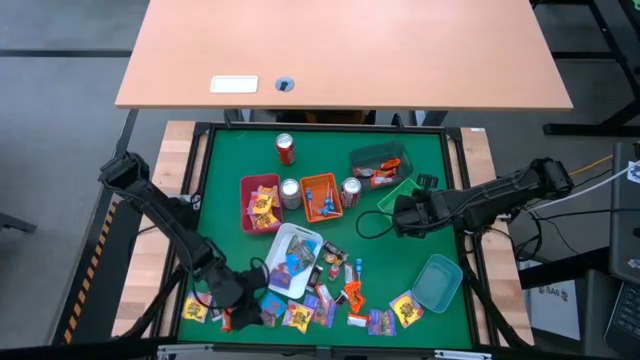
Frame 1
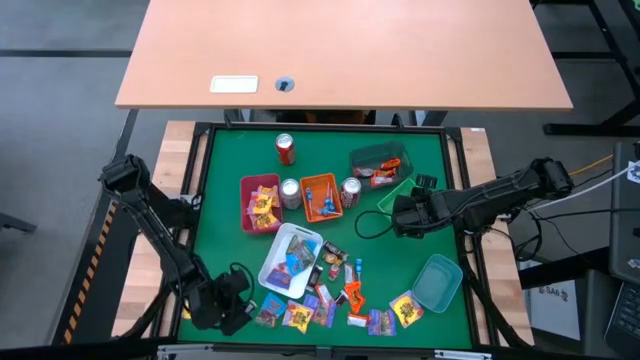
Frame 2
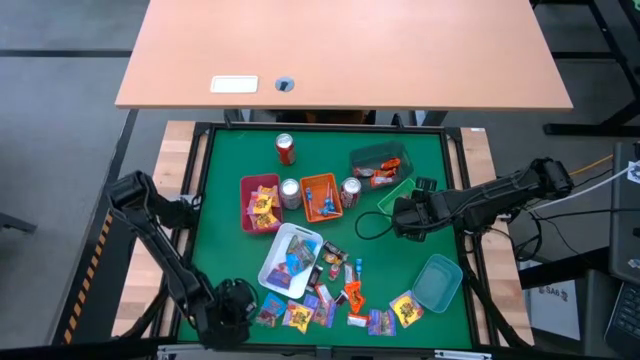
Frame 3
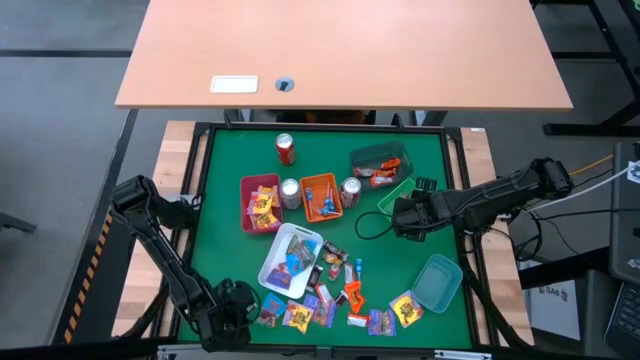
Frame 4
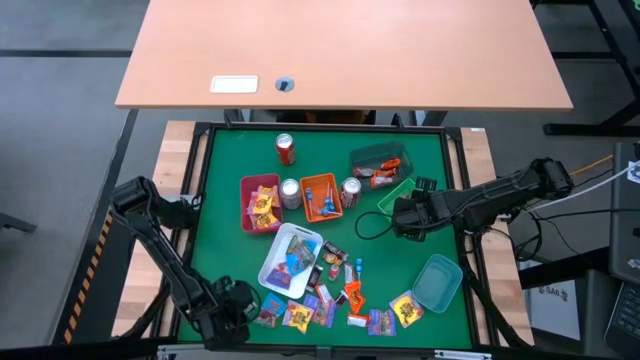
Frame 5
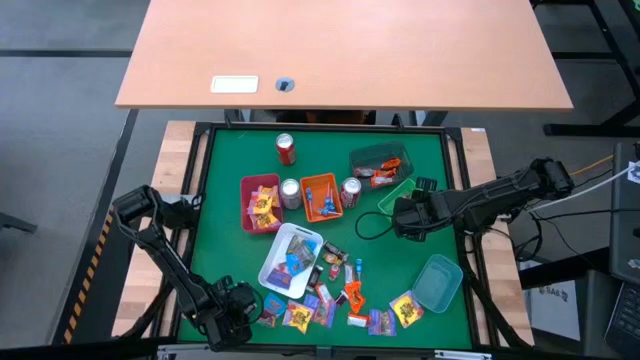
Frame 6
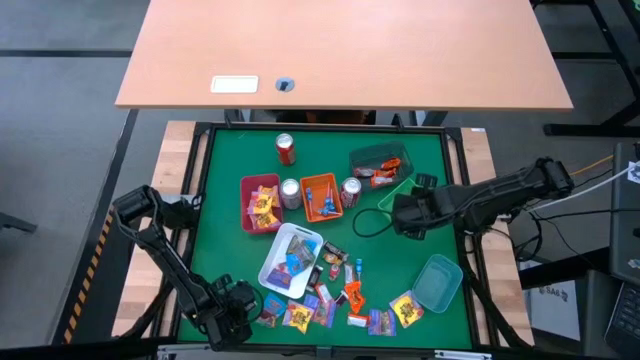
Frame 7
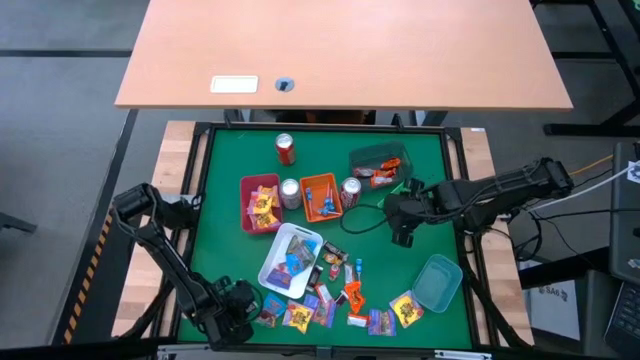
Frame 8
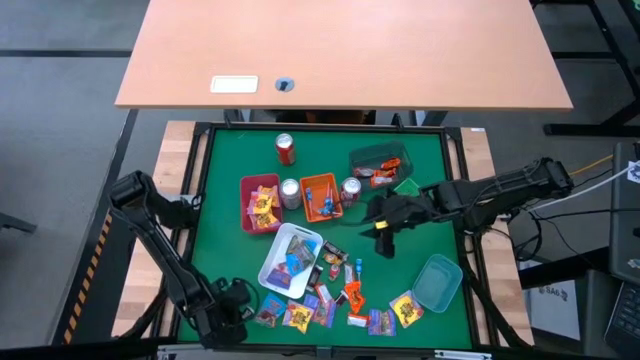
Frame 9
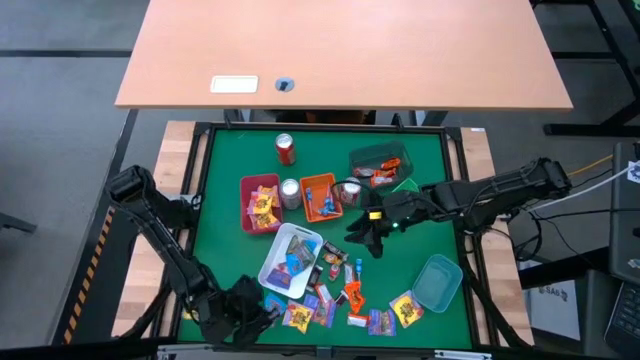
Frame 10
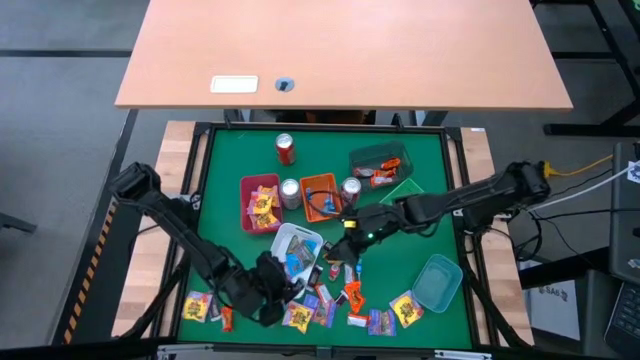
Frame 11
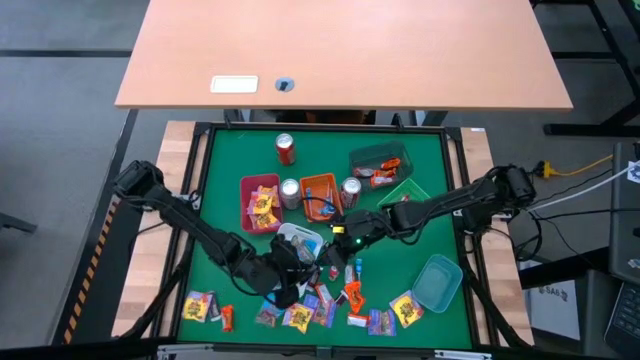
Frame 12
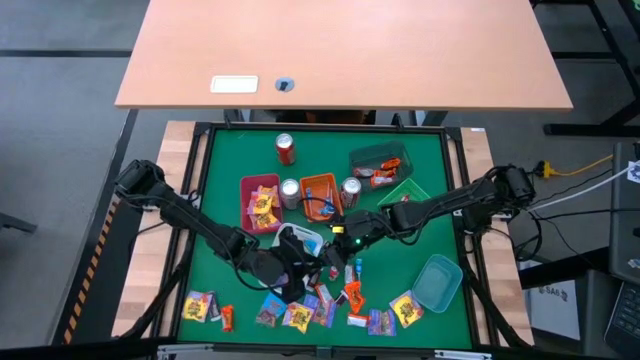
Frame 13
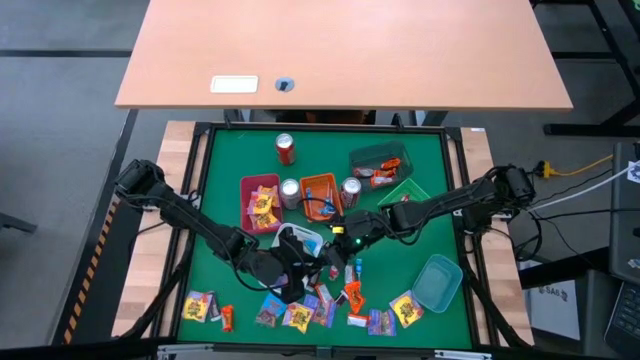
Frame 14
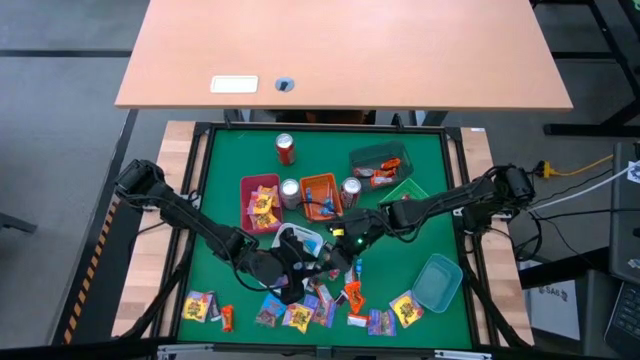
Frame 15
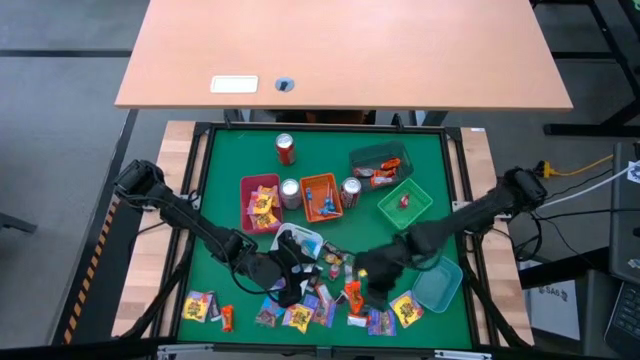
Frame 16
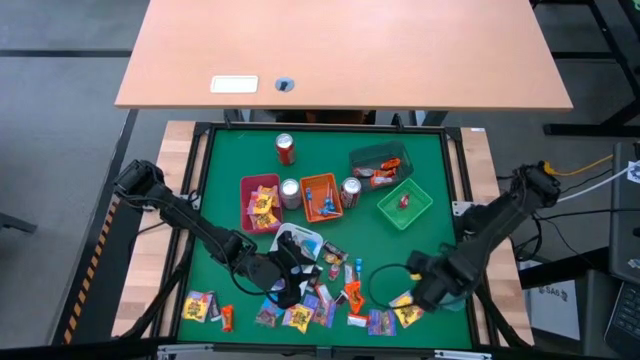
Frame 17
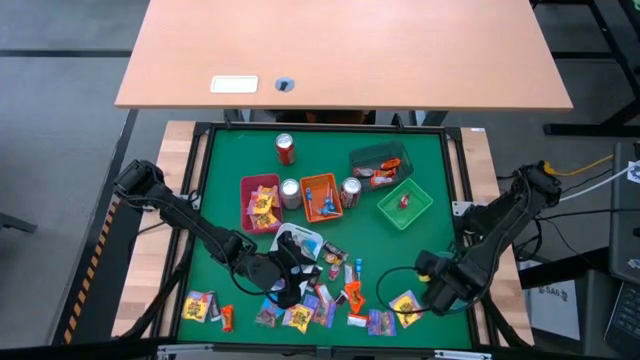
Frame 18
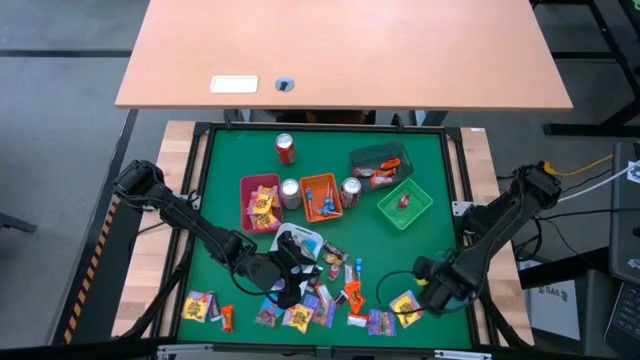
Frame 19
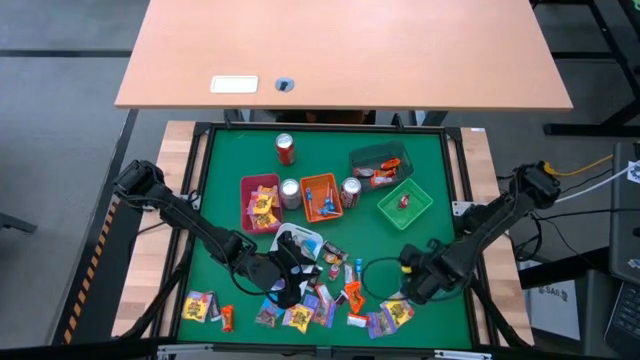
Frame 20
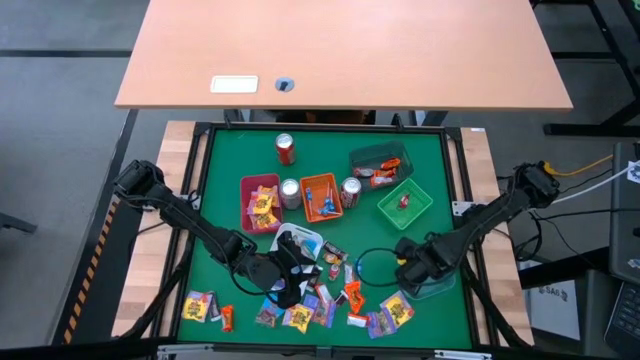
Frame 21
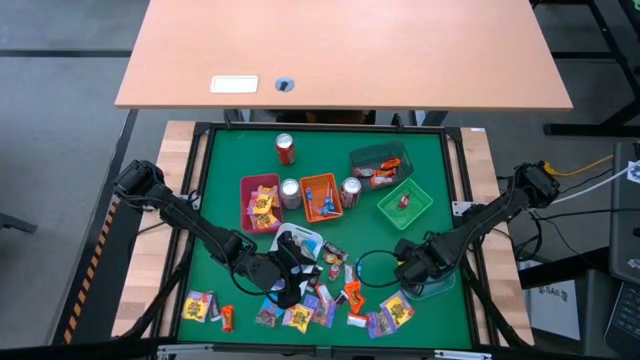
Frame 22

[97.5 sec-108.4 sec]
Task: Sort candy
Put the brown chocolate into the blue bin

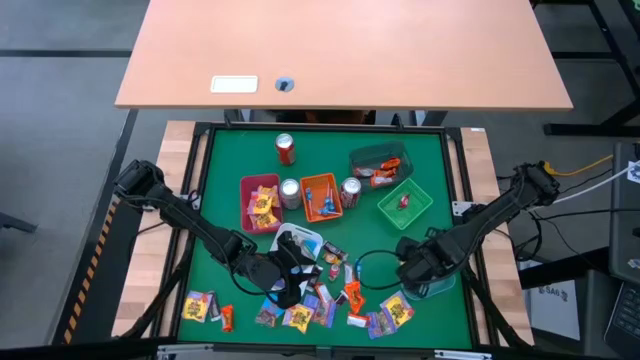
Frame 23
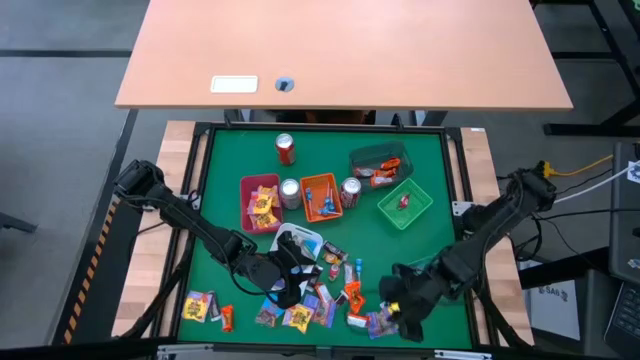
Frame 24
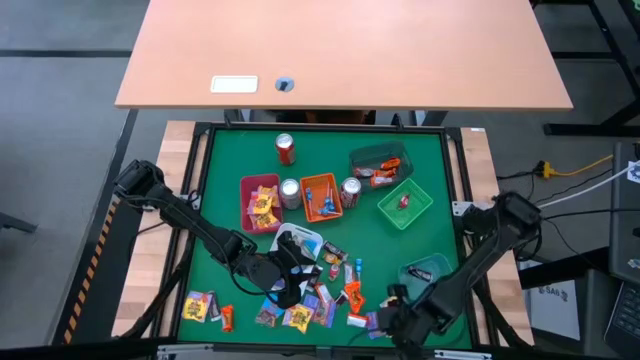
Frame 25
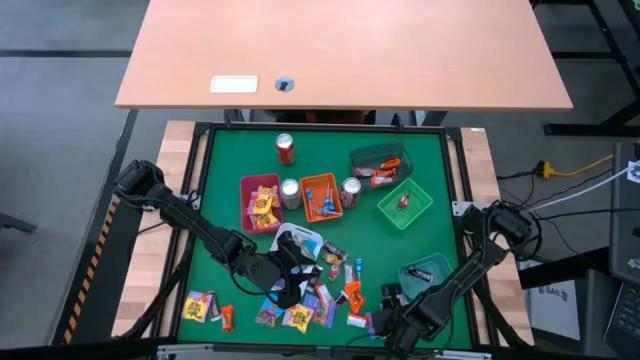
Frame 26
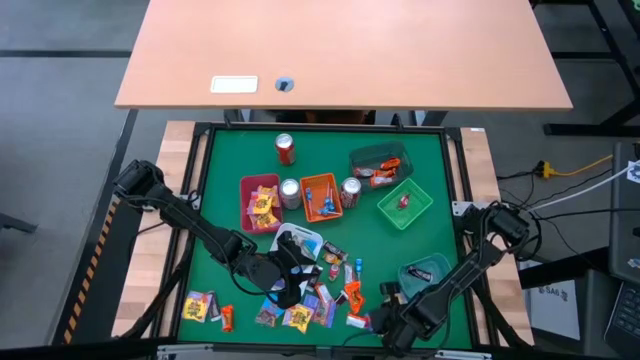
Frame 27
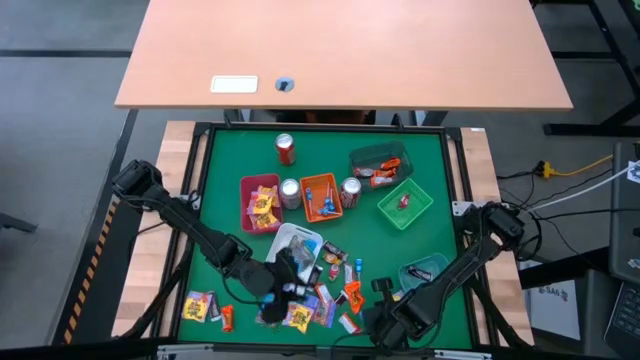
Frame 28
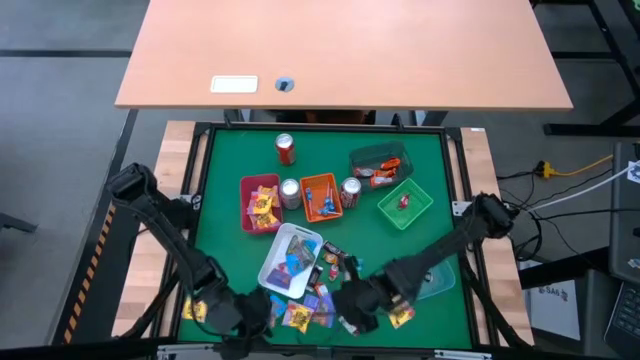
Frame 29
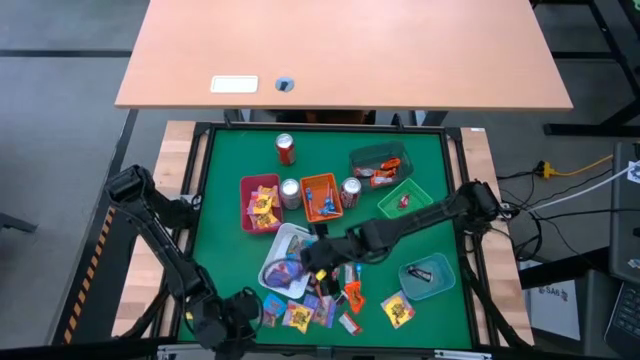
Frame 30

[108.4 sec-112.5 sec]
Put the gummy candy into the white bin

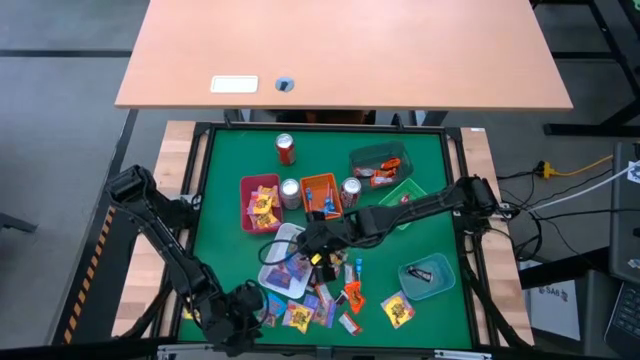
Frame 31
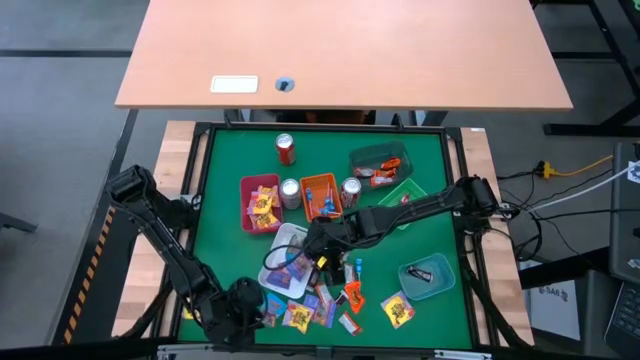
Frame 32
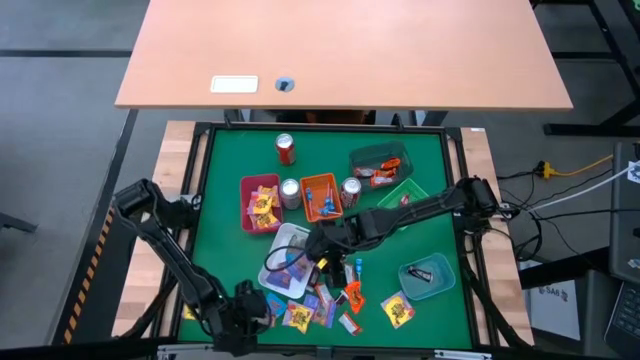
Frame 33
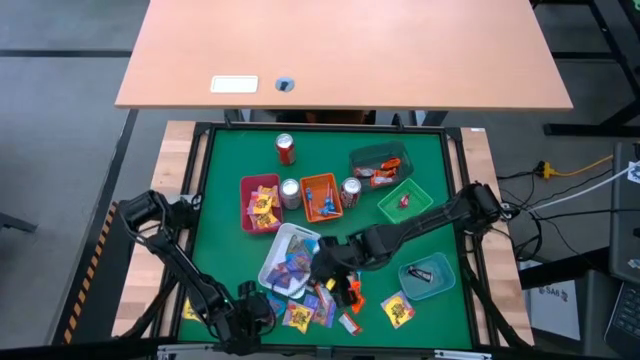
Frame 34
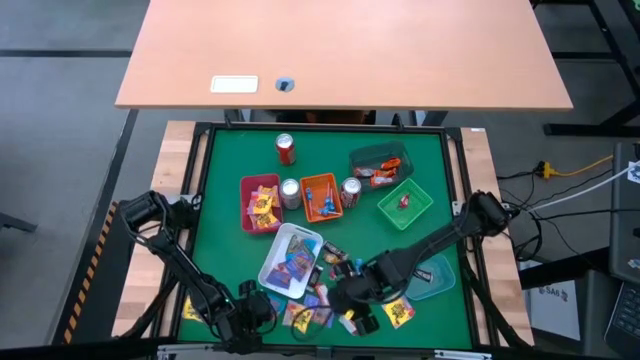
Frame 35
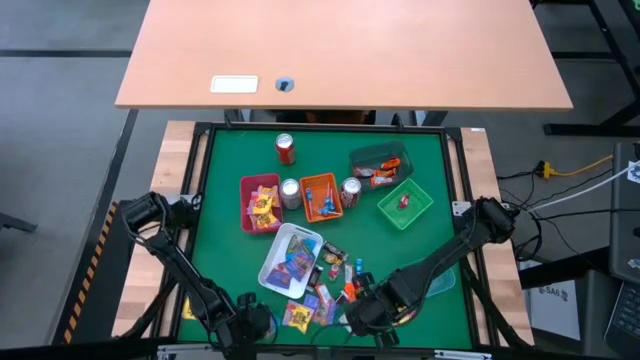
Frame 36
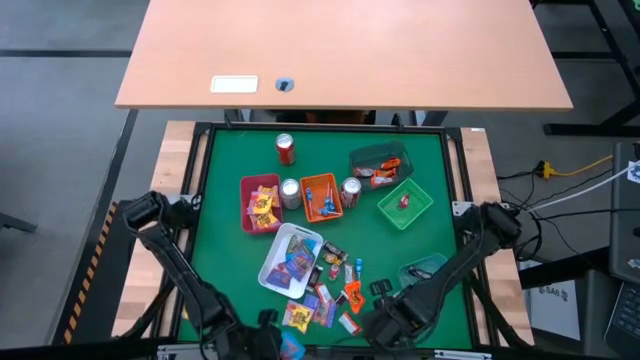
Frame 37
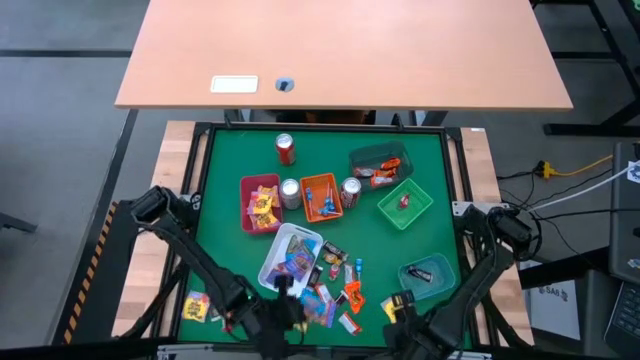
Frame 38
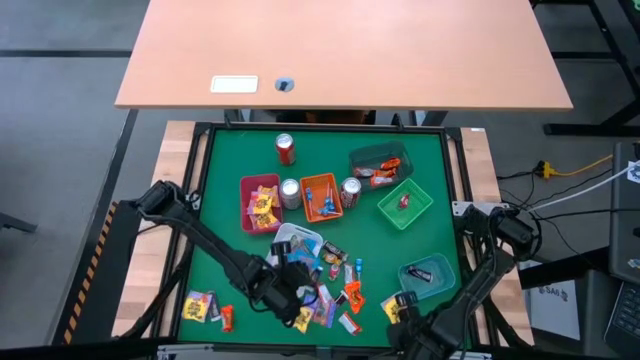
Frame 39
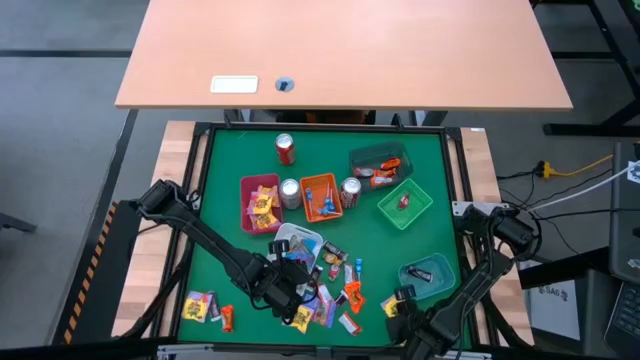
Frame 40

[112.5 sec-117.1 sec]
Put the blue gummy into the white bin

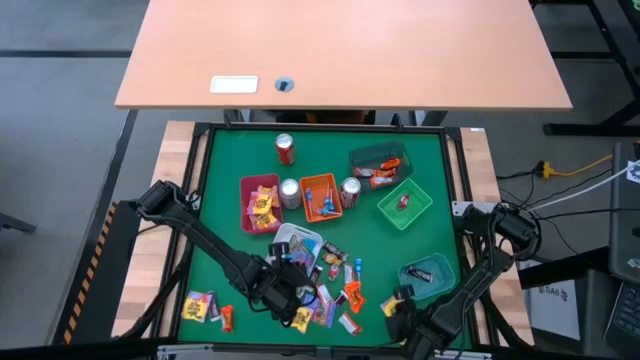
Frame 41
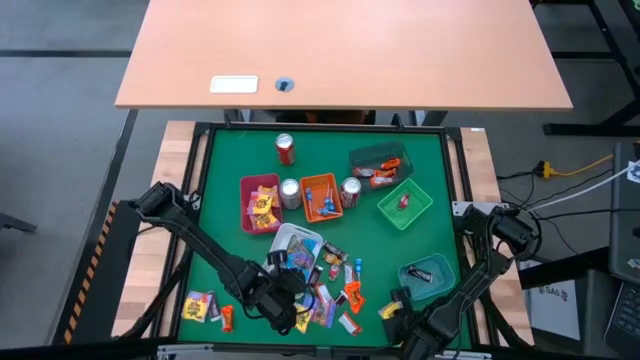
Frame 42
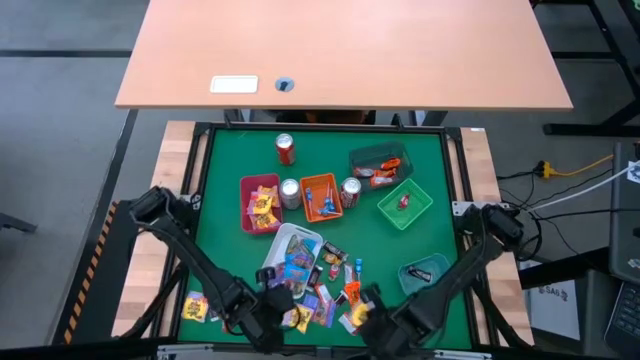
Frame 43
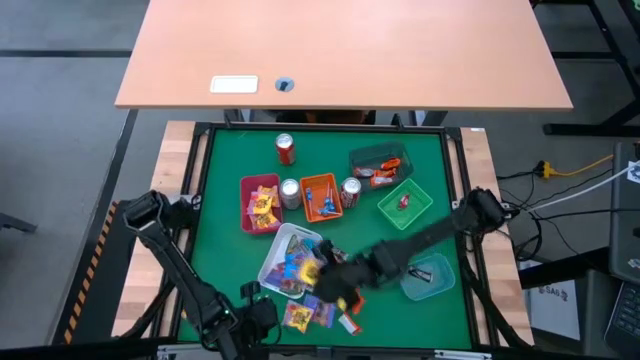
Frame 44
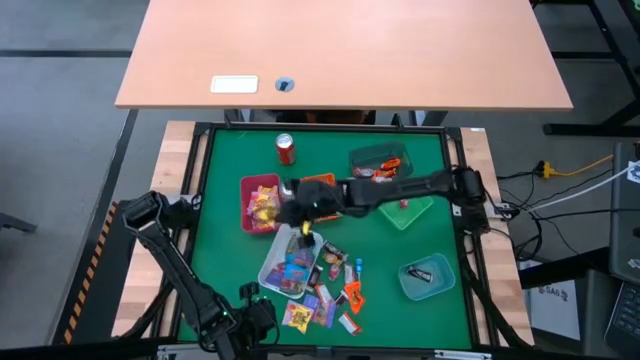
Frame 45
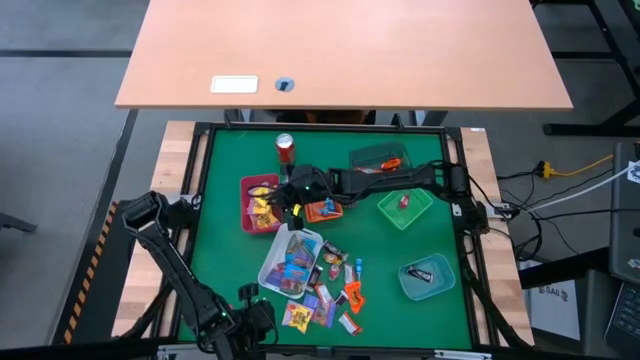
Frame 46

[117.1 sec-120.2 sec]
Put the yellow candy into the red bin
